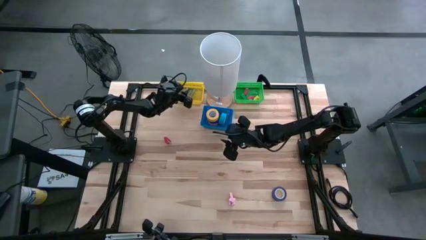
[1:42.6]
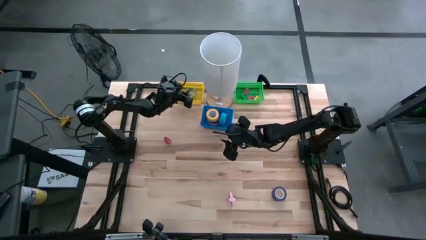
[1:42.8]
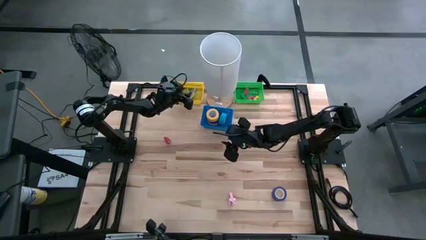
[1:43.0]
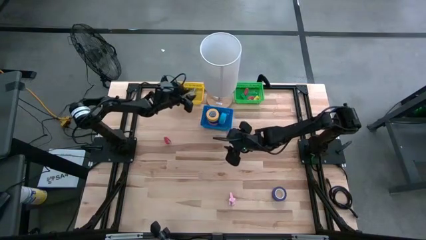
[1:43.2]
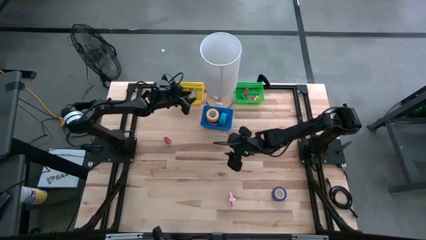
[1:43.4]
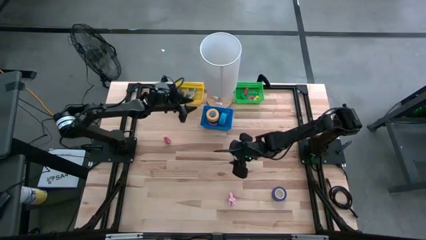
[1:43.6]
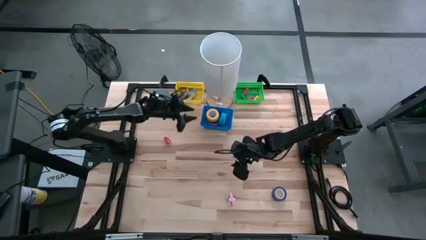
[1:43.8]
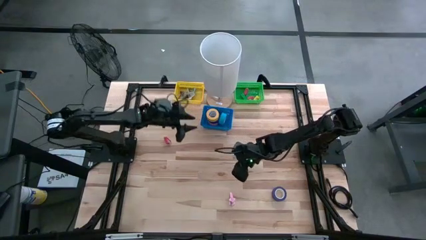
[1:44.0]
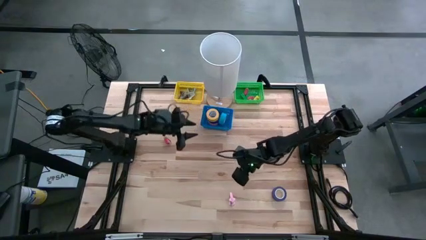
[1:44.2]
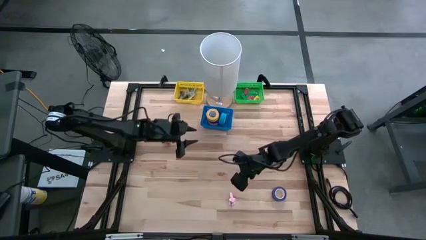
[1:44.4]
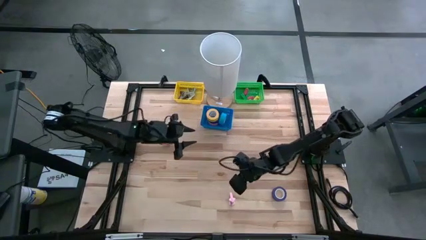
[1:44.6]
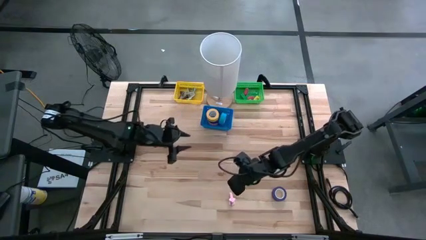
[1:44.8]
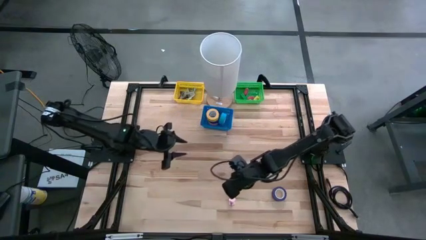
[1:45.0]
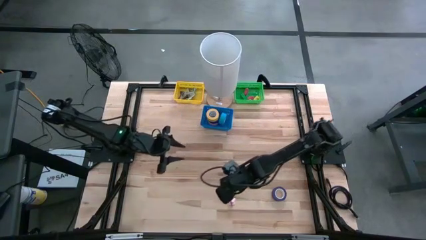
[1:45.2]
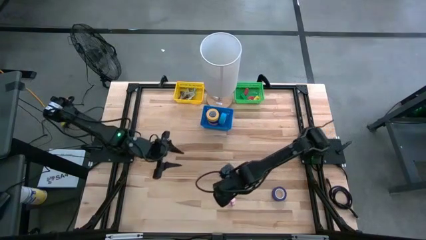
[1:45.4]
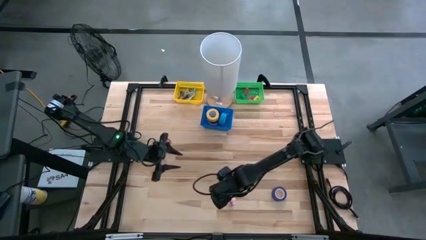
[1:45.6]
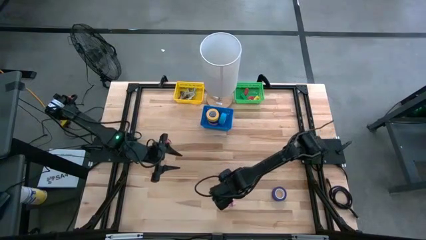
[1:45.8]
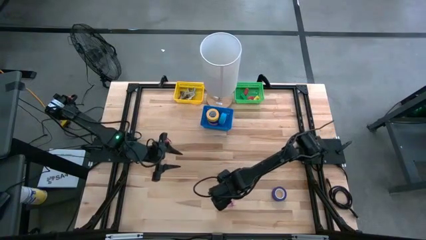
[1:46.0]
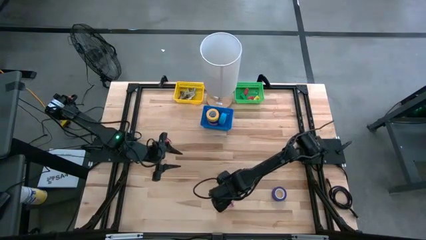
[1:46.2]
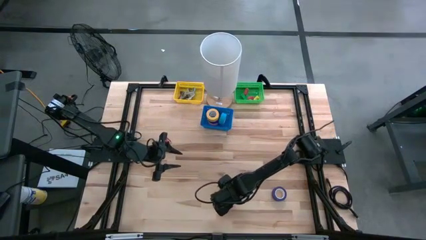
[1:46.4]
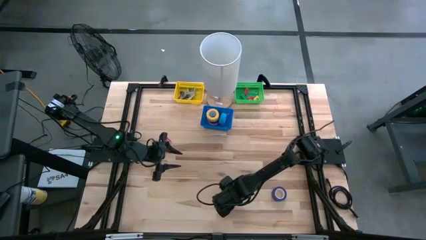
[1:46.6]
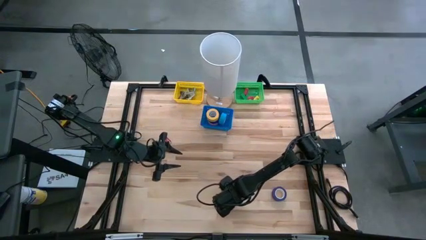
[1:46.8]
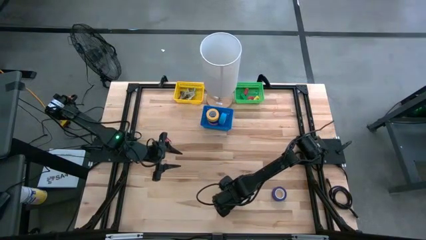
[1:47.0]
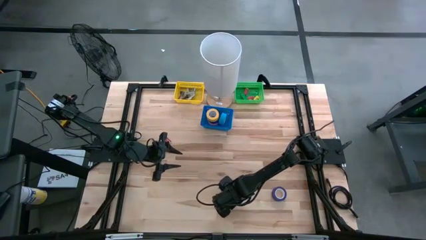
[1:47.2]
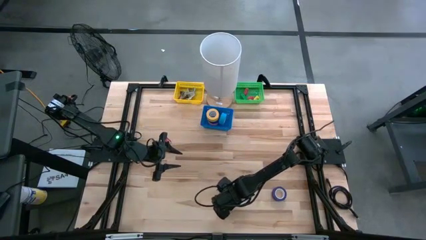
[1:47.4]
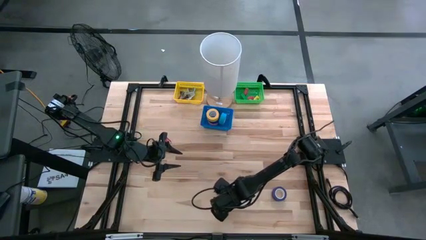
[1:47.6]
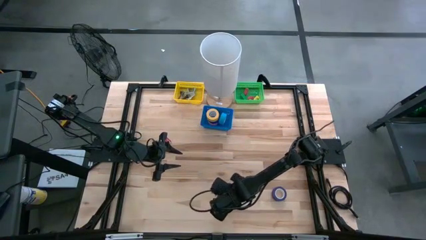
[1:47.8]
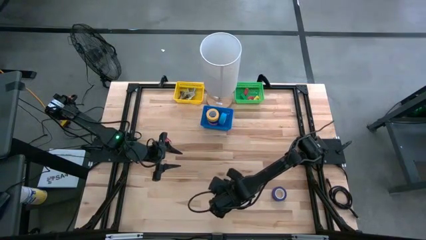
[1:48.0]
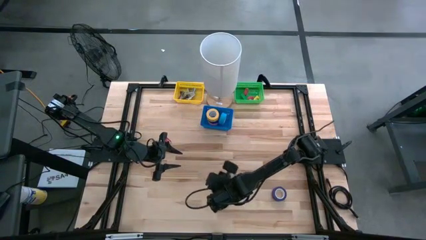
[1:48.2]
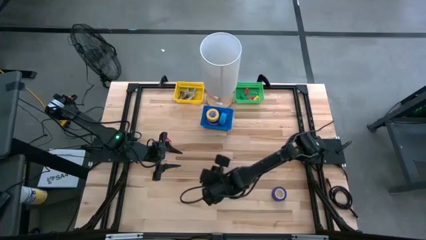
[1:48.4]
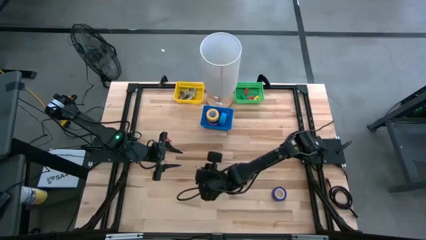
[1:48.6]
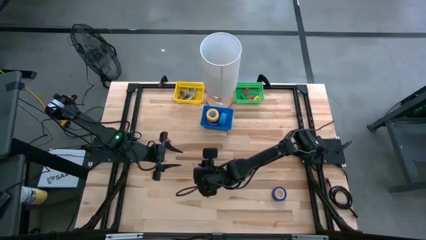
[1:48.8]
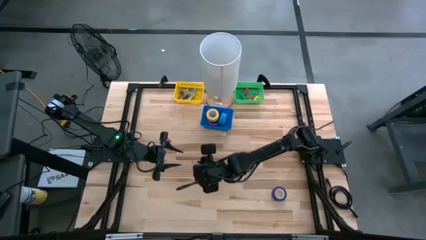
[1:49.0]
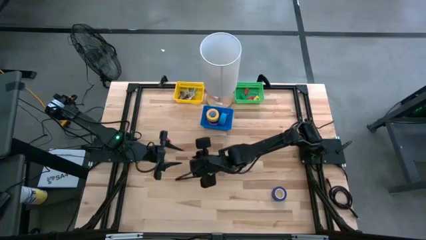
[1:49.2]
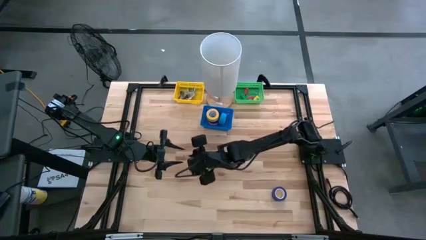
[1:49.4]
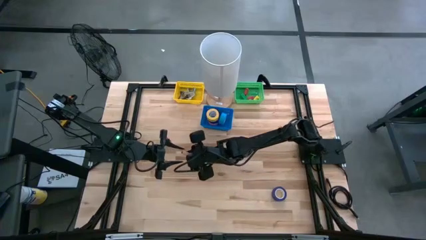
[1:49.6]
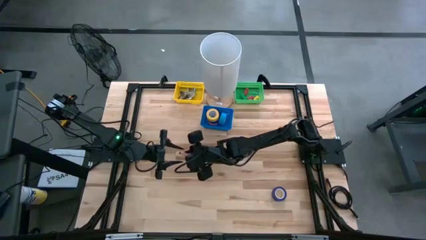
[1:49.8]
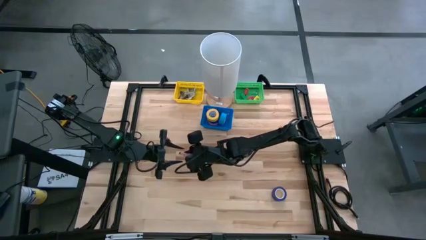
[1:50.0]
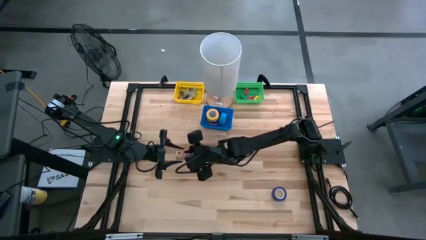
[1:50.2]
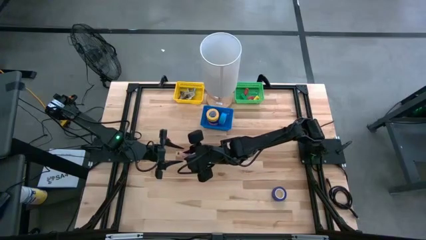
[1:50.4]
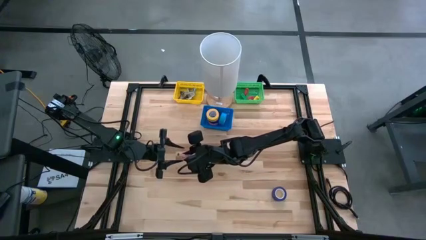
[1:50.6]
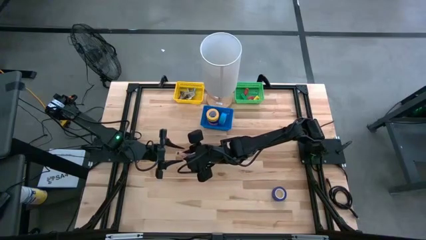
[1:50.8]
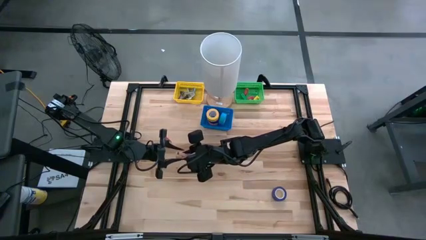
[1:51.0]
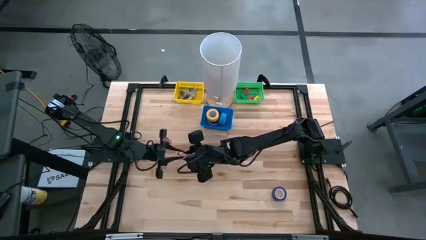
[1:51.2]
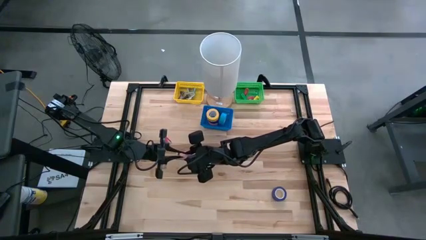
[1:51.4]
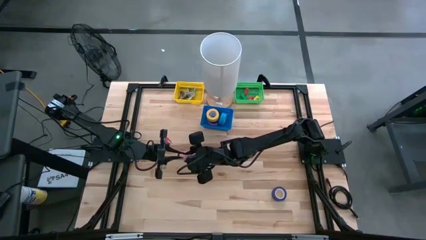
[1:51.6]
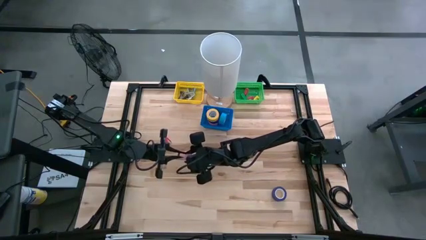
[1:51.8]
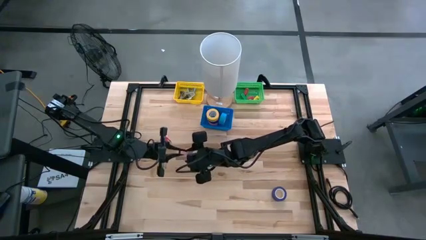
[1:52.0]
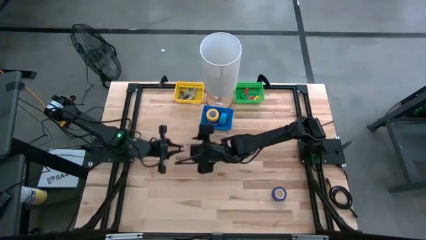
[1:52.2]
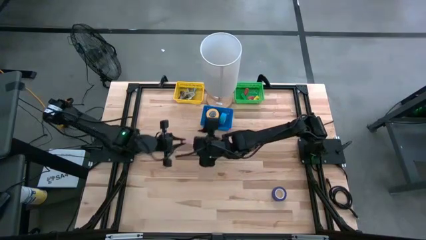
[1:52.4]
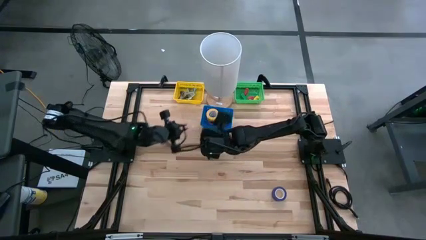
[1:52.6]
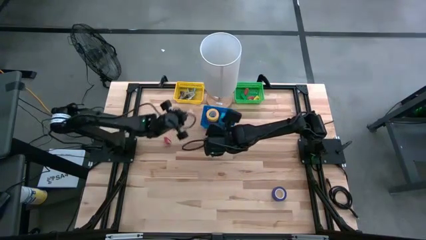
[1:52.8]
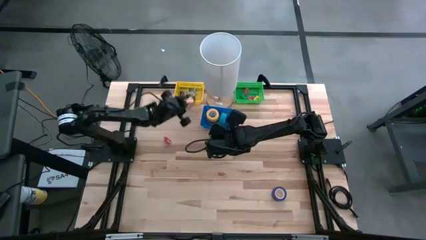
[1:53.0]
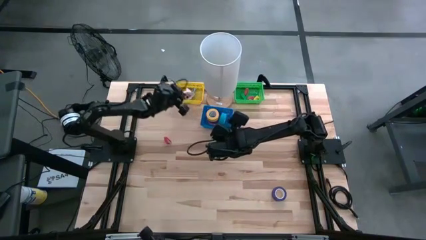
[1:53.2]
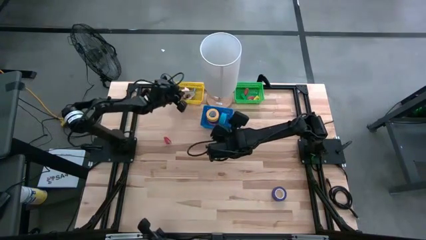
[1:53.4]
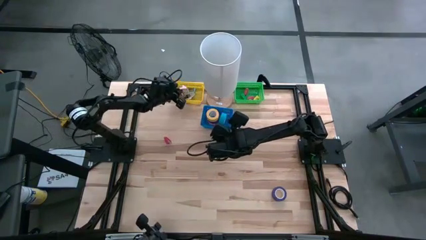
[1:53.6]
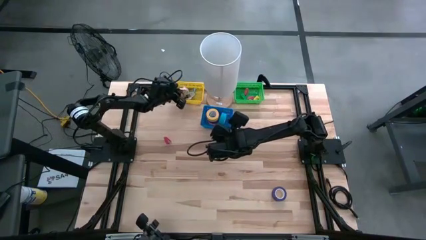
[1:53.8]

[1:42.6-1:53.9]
Task: Pick and place Stapler, Stapler remover, tape
Put the pink staple remover into the yellow basket

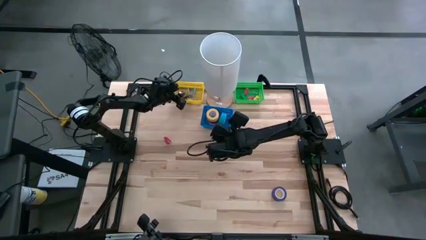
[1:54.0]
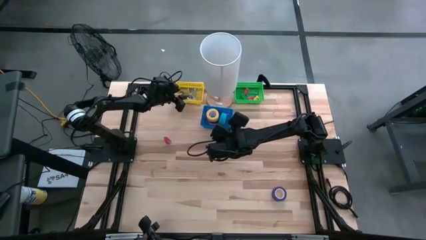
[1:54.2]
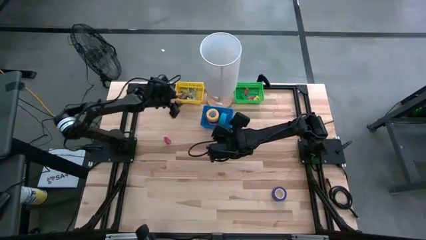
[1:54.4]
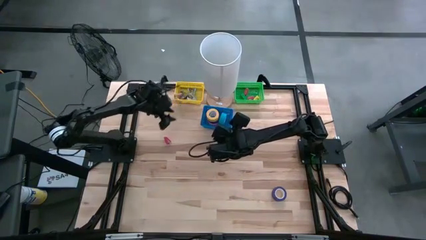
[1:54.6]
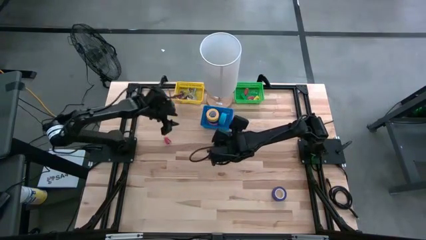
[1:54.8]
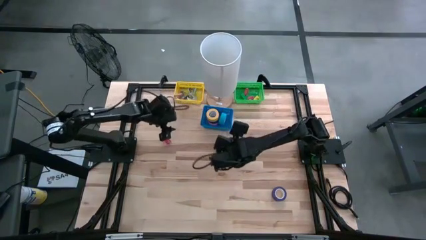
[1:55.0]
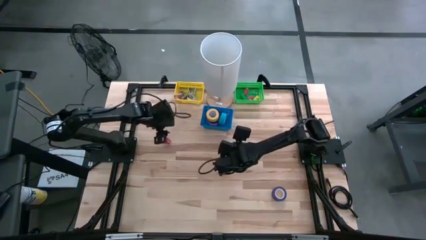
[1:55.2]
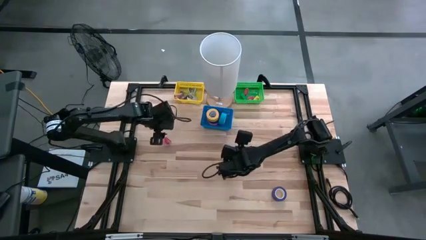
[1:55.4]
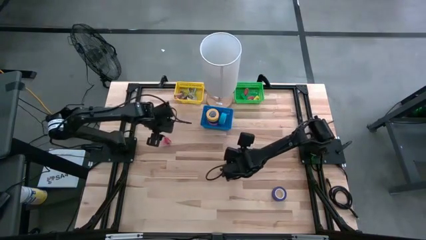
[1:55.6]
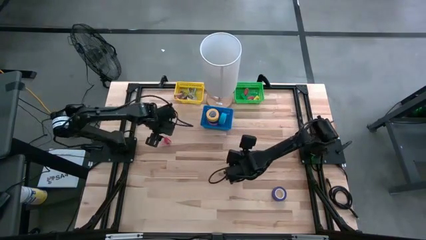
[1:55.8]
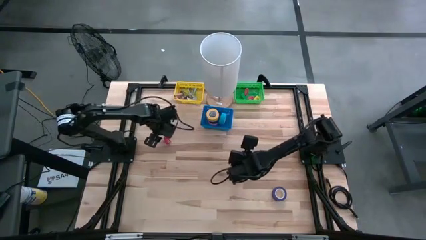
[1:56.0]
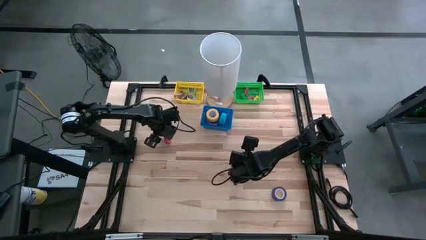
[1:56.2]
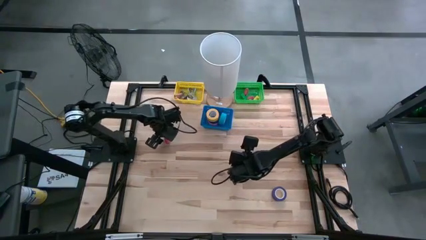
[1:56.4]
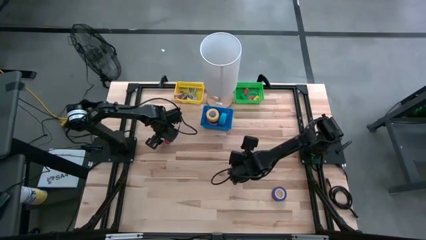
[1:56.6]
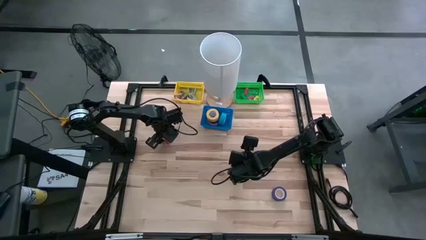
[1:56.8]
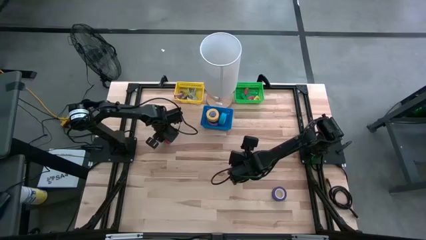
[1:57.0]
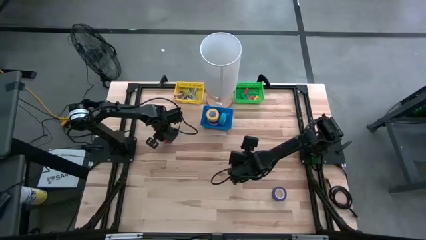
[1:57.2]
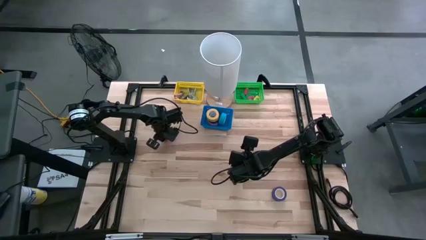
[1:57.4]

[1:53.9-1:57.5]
Put the red stapler into the green basket

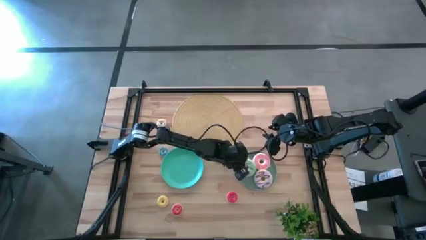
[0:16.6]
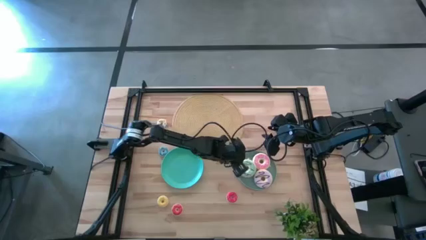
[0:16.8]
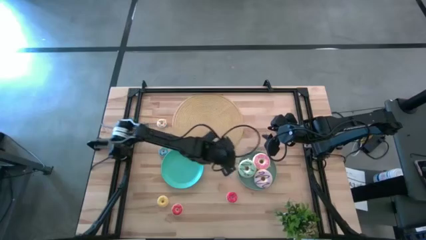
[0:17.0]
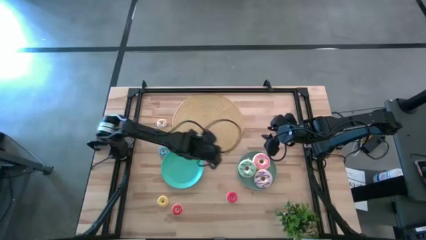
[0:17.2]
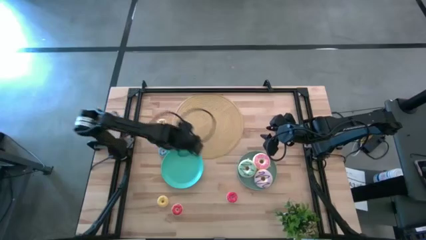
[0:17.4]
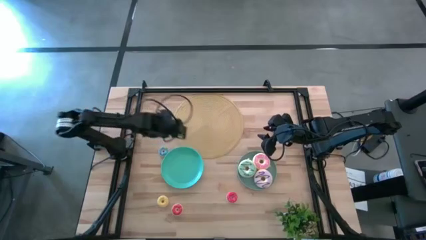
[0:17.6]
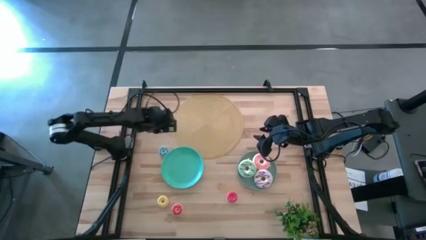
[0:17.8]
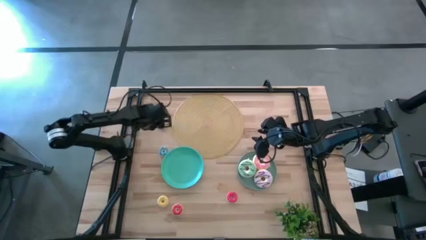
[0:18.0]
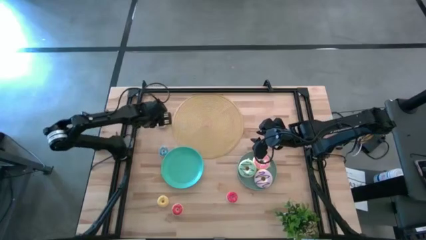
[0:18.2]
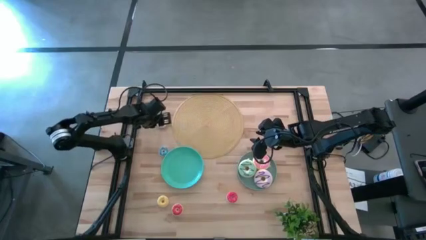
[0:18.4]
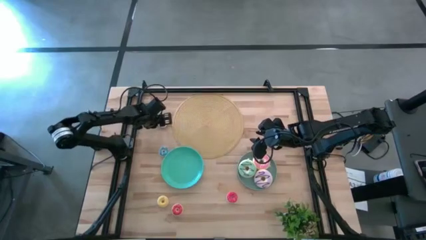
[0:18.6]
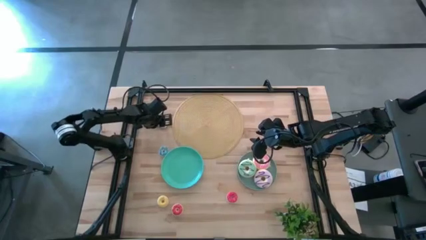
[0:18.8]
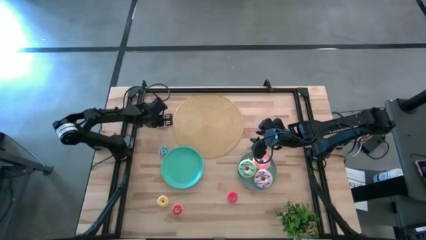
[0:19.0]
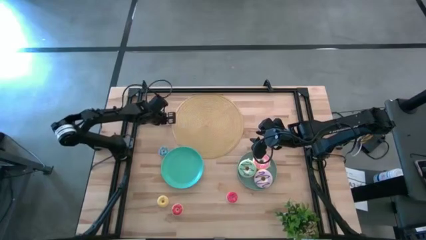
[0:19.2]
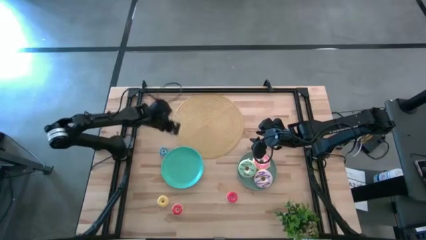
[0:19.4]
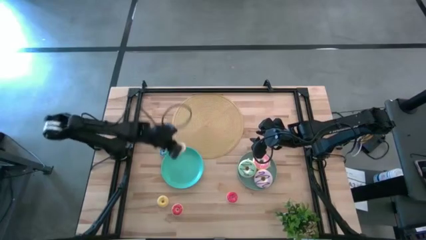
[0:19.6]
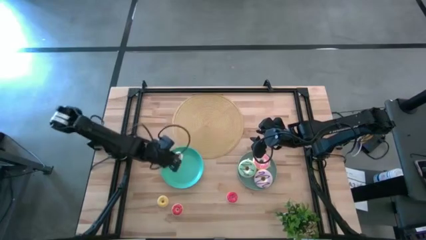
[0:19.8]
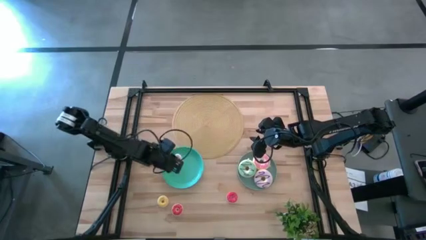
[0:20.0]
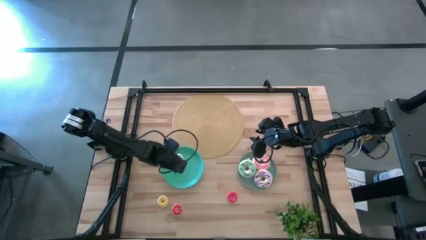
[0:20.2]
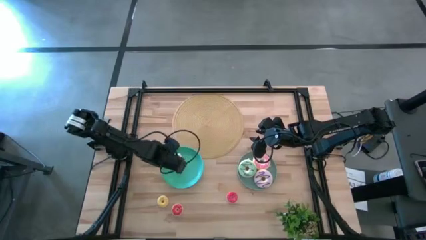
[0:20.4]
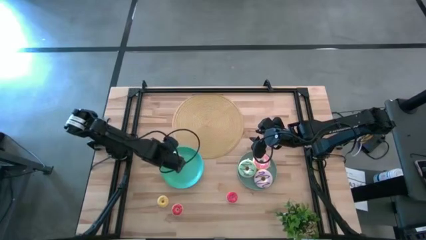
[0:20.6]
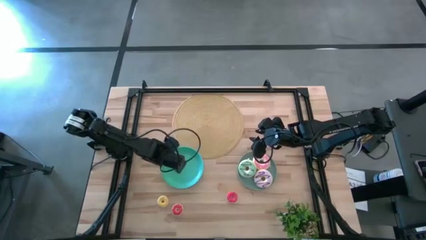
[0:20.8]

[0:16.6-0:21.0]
Task: Pick & Place donuts
Put the small white donut on the light green plate
